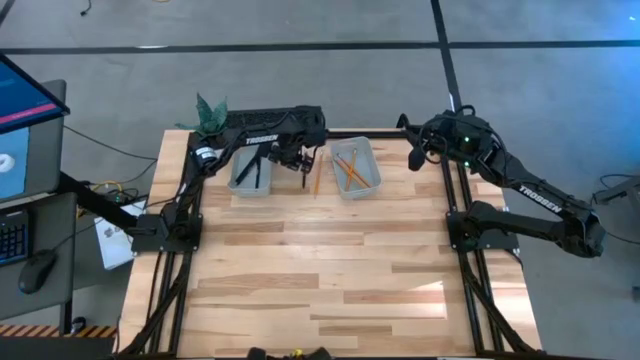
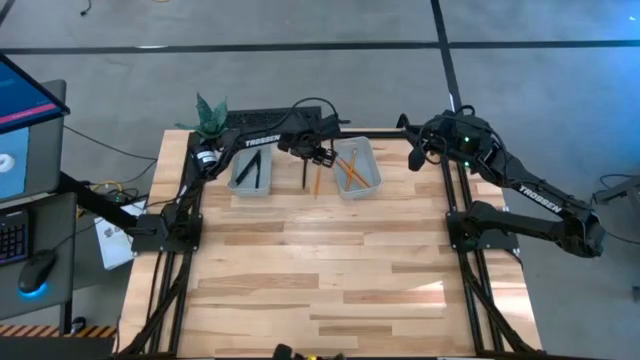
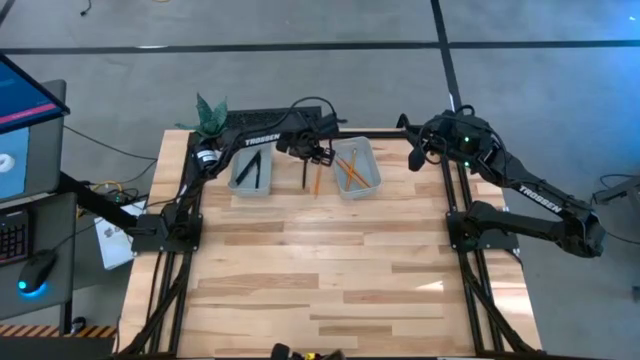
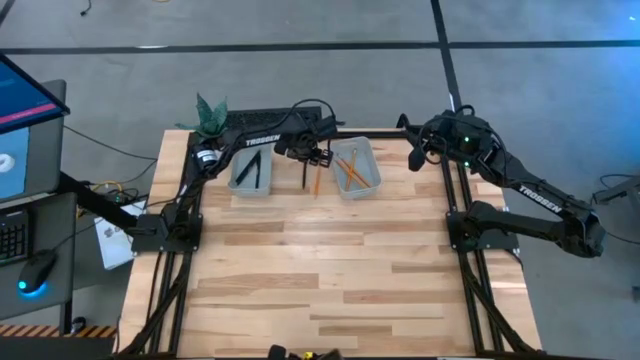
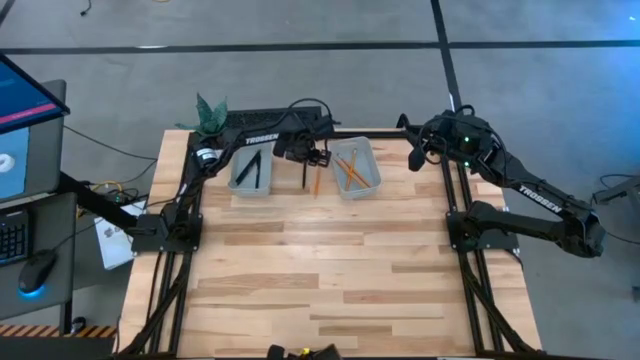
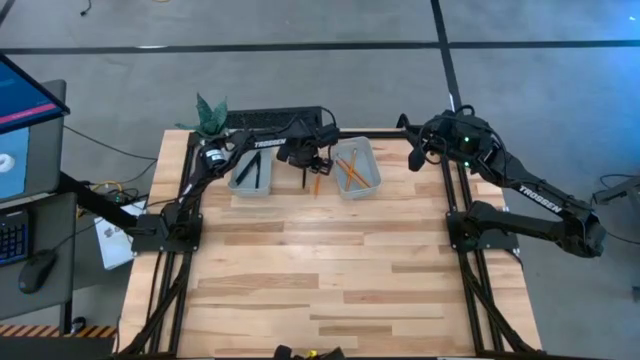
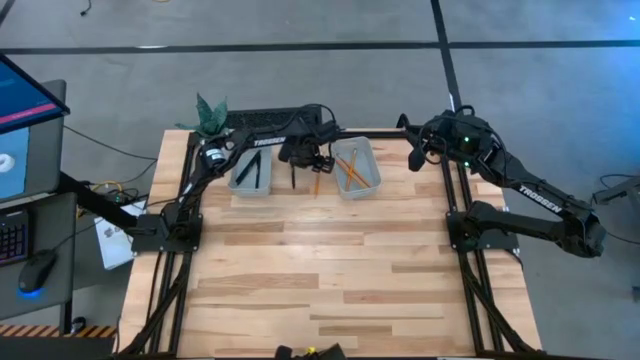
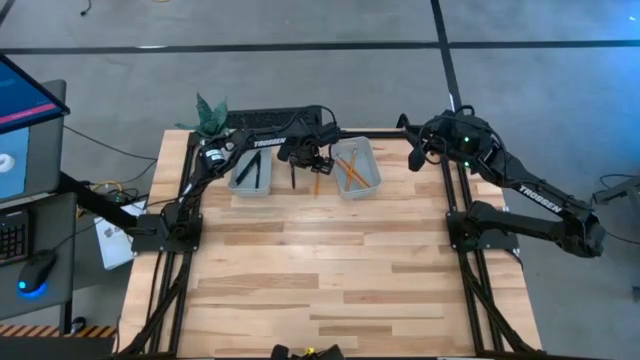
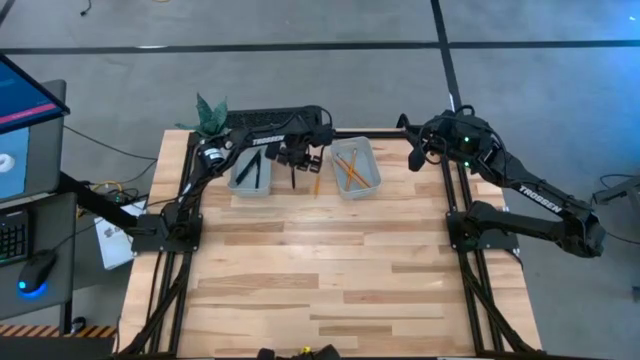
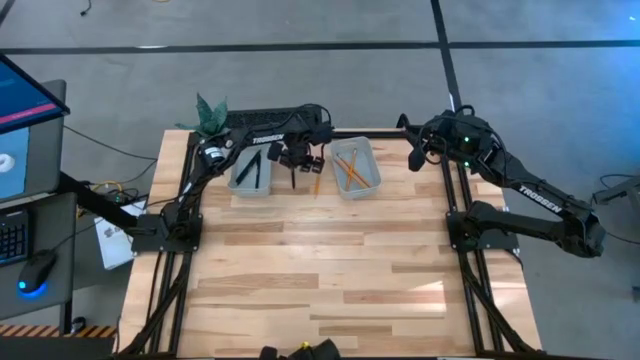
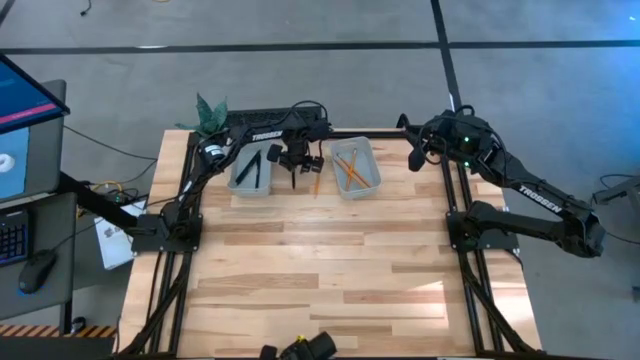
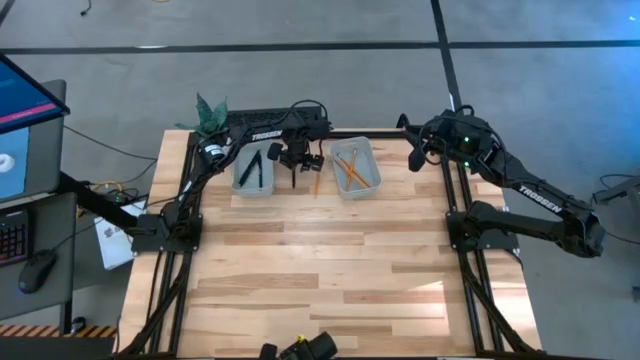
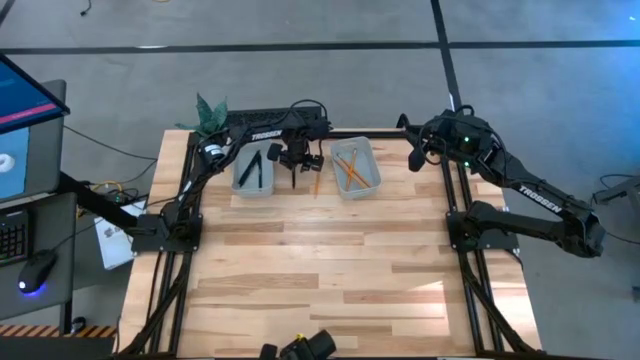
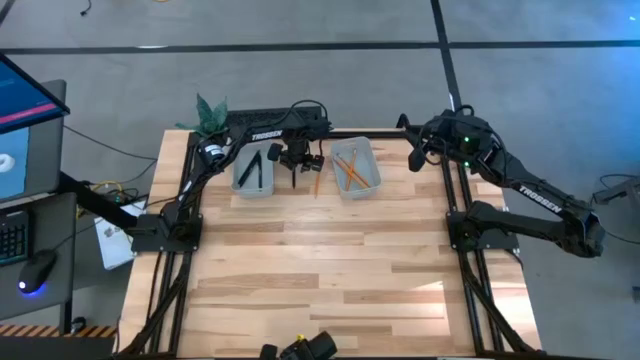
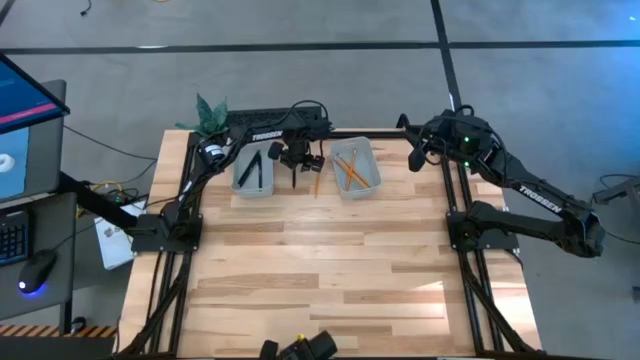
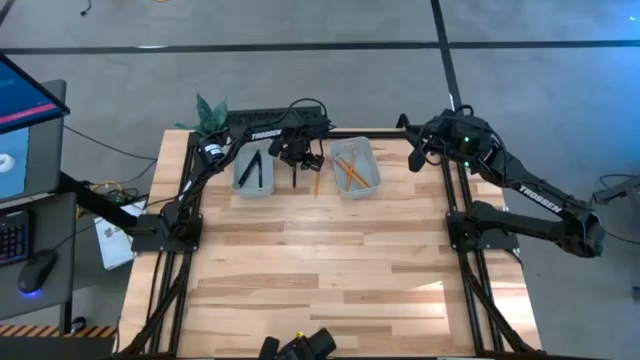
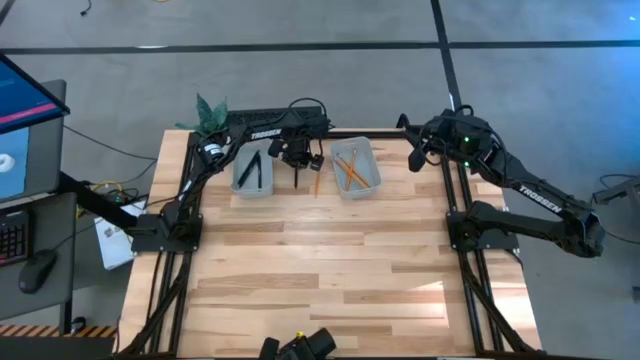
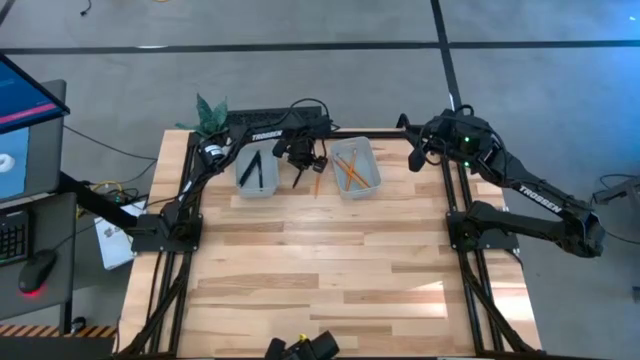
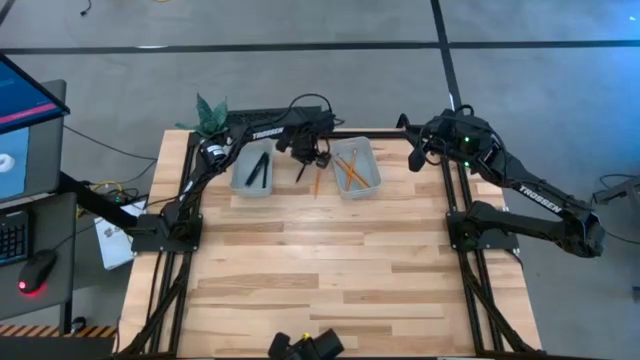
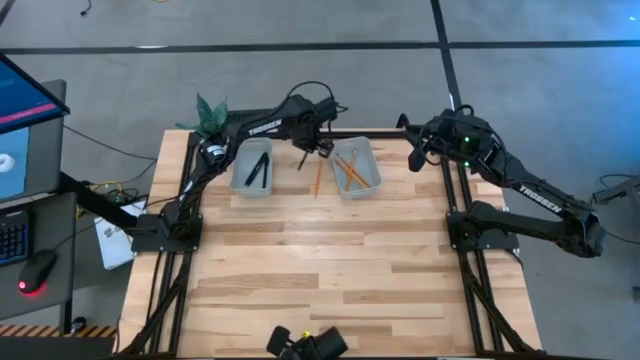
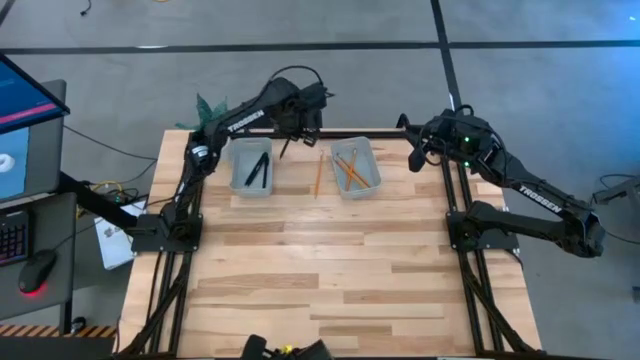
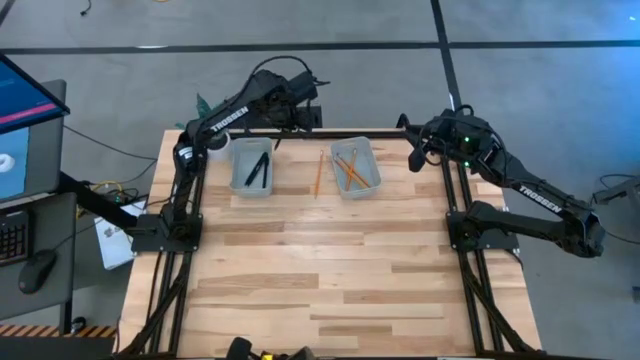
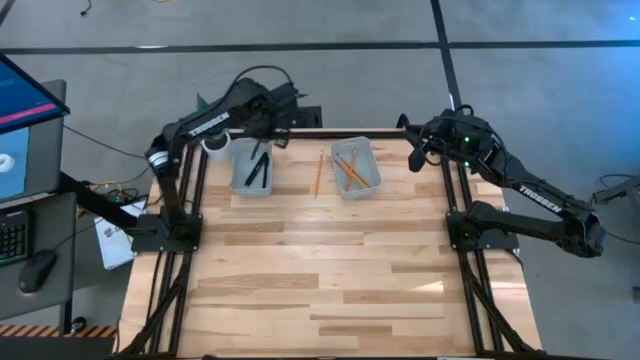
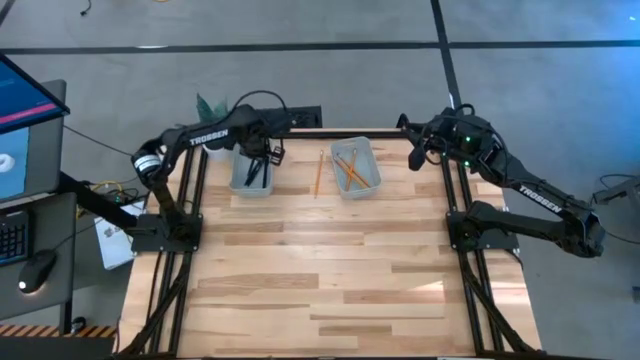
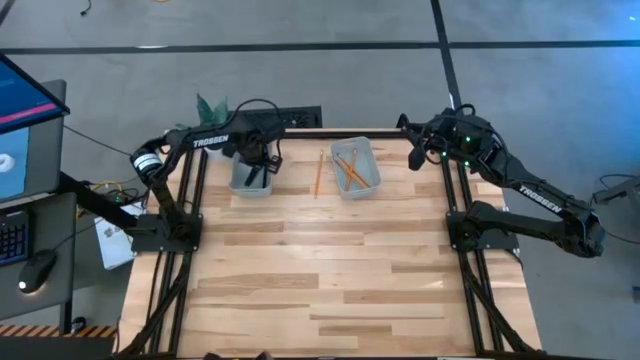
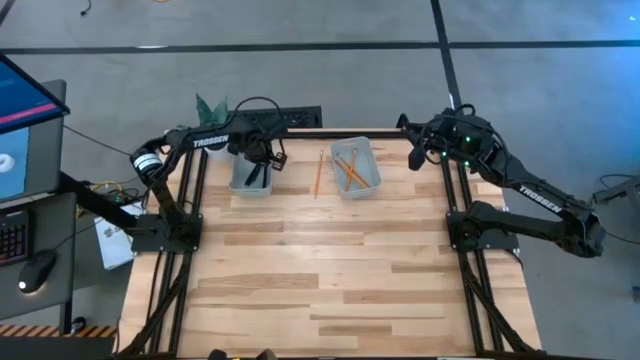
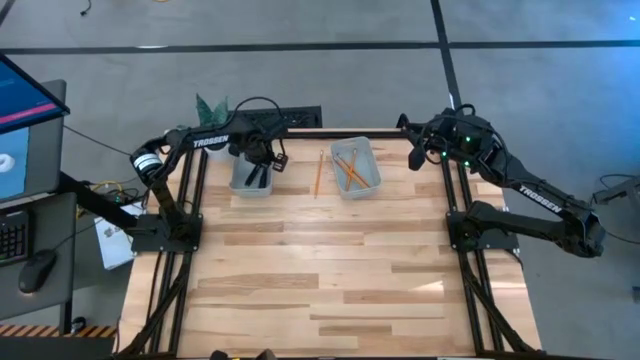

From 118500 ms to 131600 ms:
Task: Sort pens & pencils
Put the black pen into the left gray bin

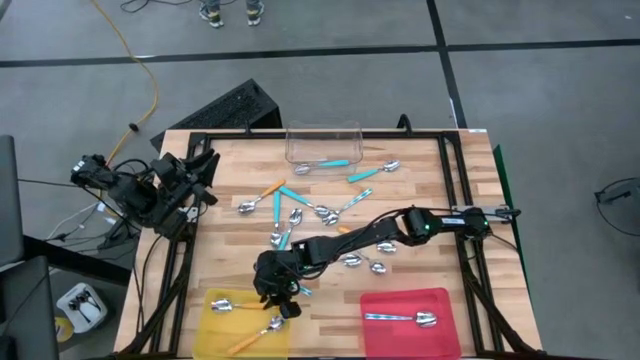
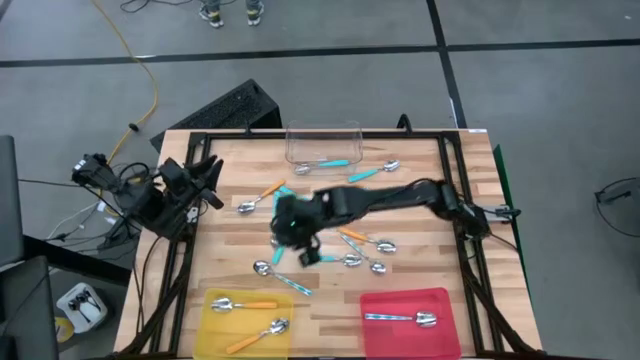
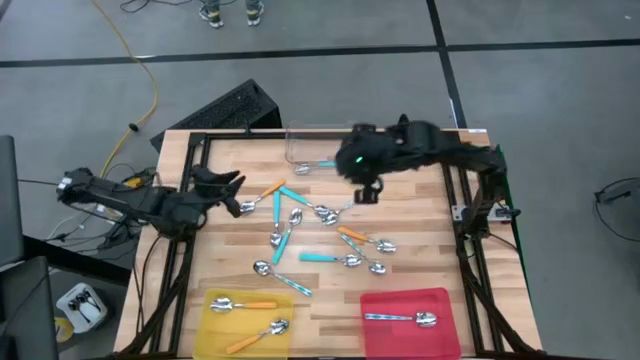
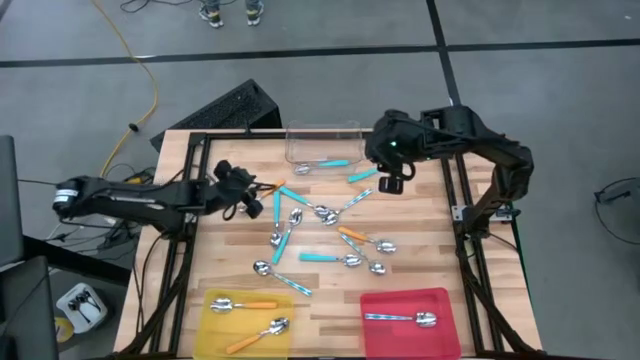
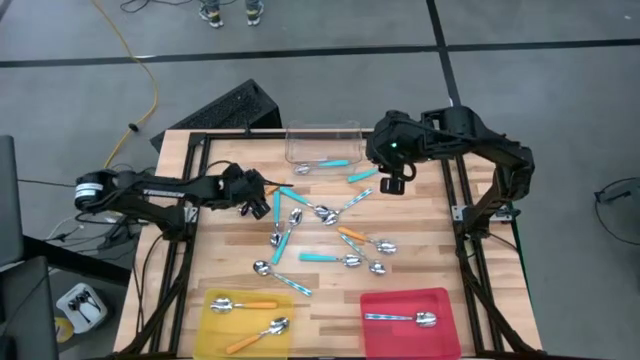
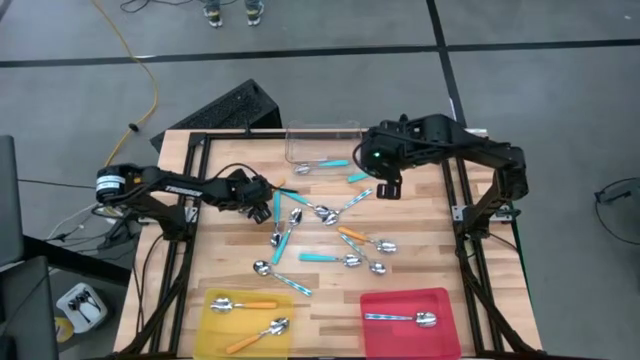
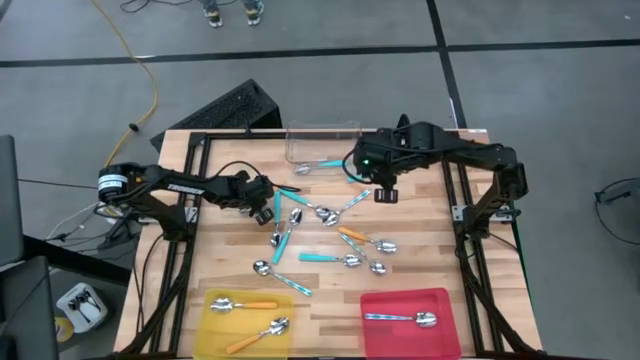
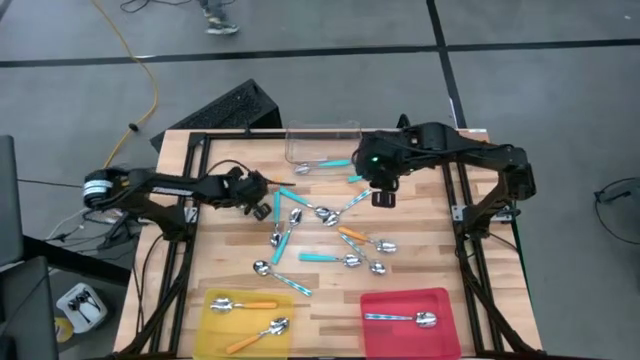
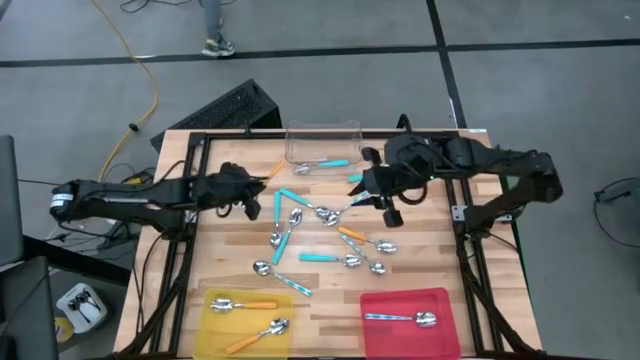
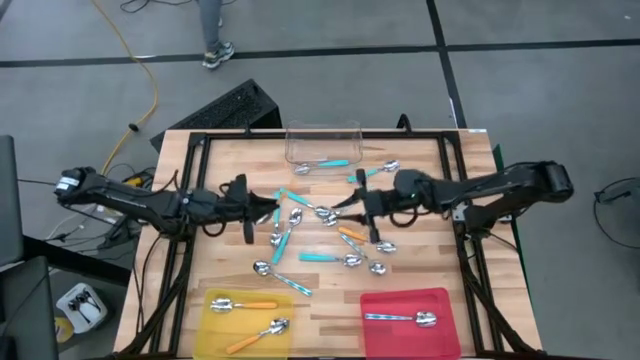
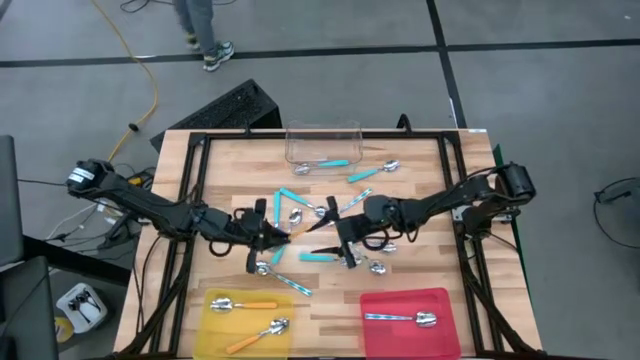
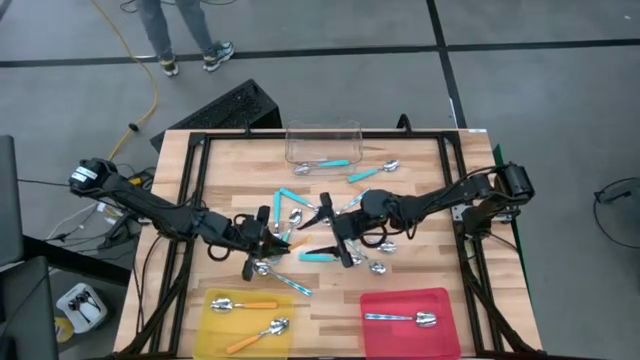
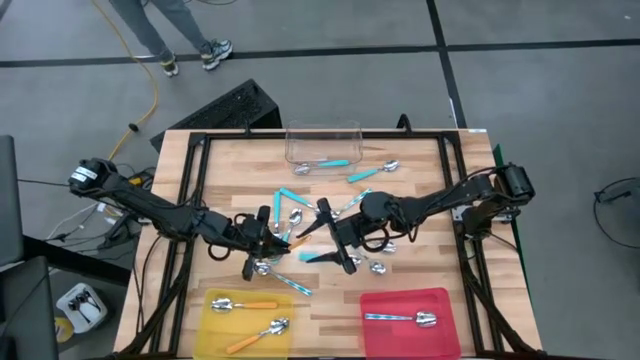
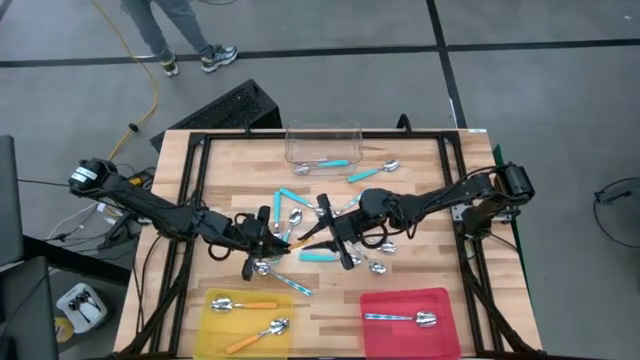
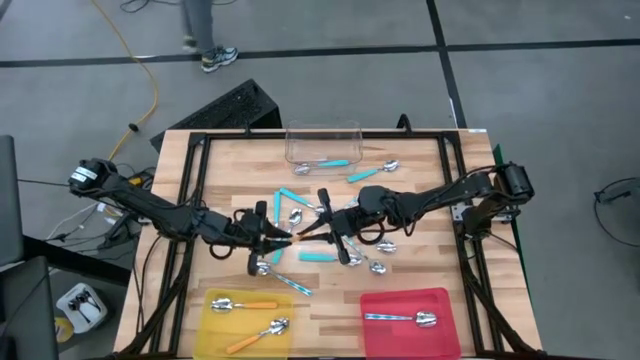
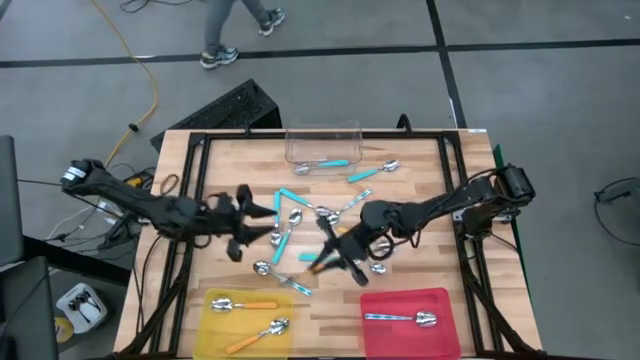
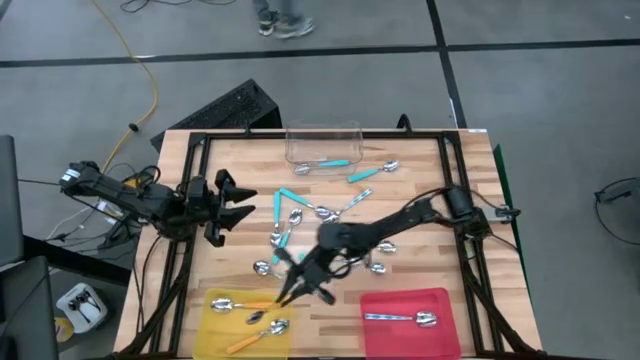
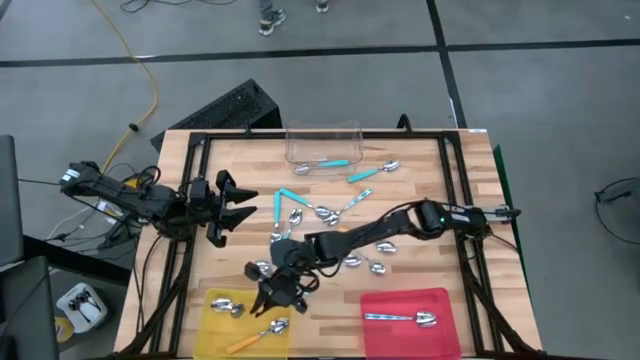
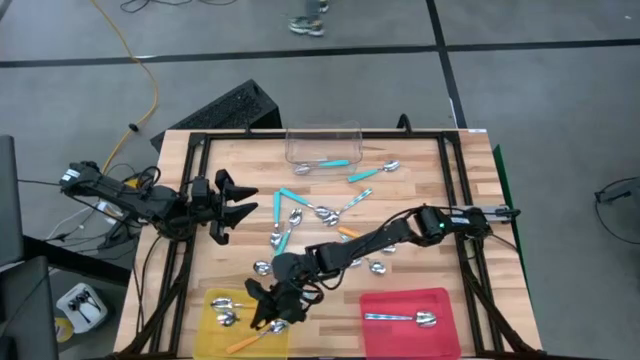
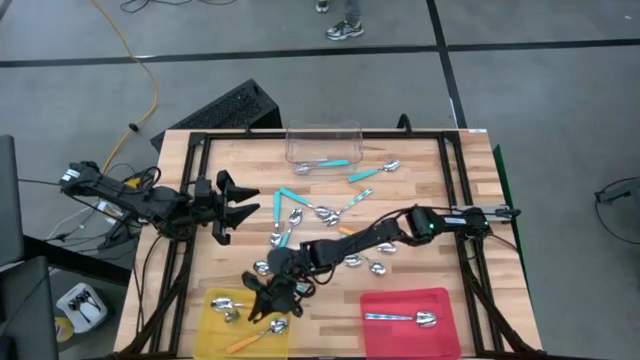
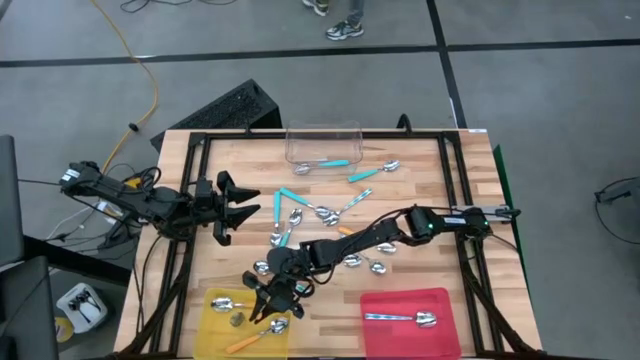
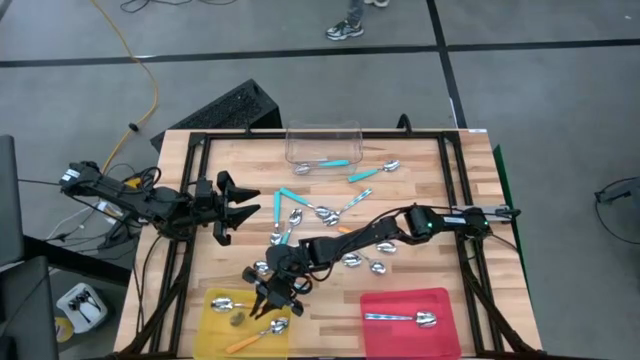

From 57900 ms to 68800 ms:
Task: Sort silverware by color (type)
Put the yellow spoon into the yellow bin
